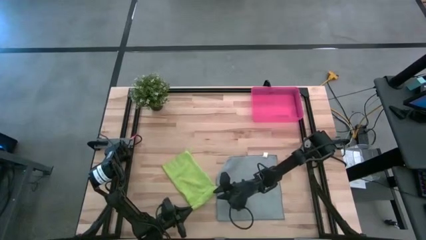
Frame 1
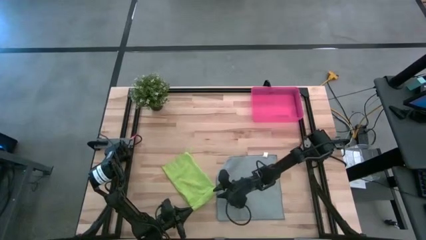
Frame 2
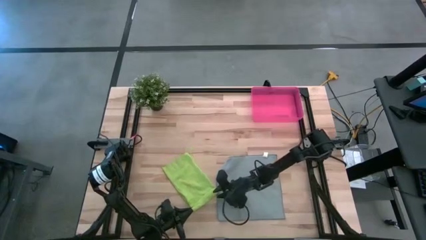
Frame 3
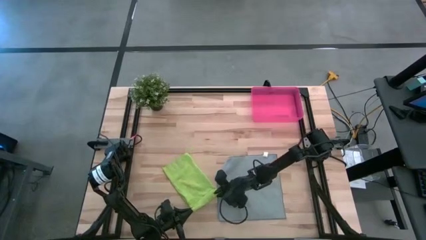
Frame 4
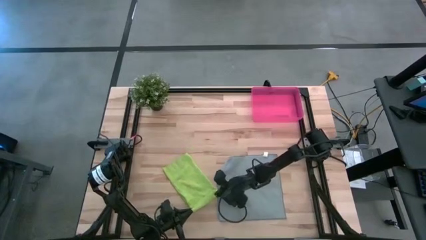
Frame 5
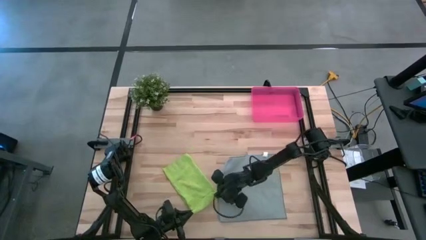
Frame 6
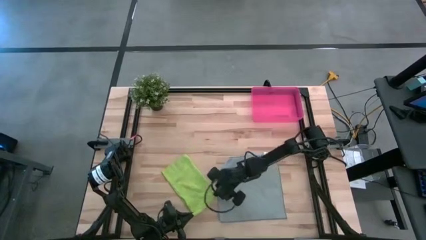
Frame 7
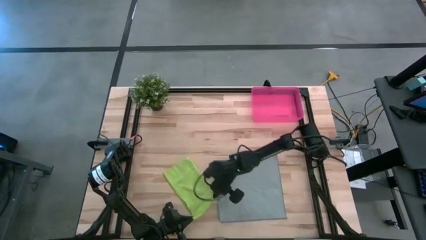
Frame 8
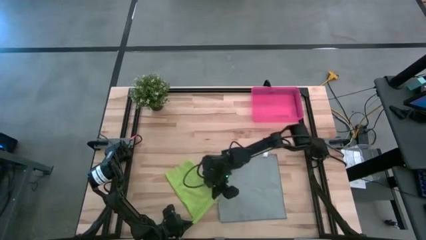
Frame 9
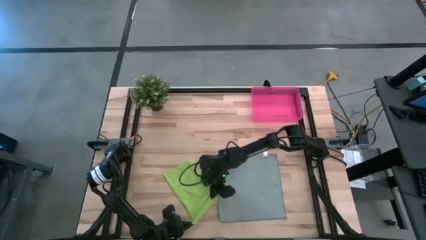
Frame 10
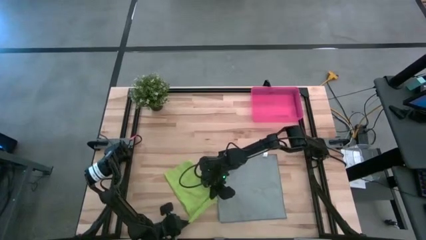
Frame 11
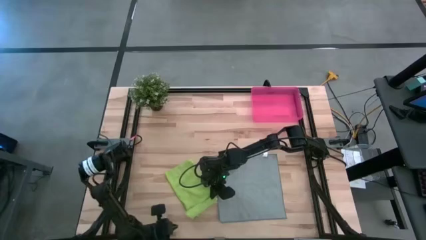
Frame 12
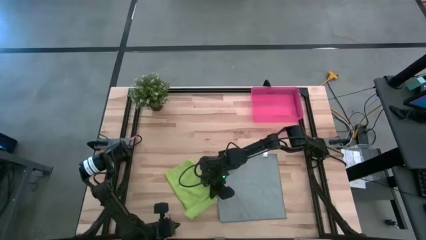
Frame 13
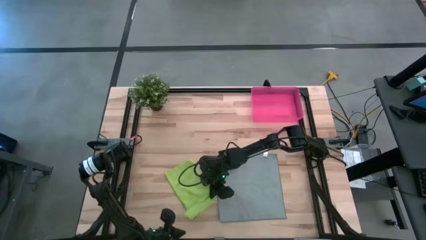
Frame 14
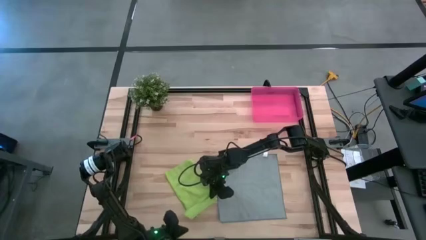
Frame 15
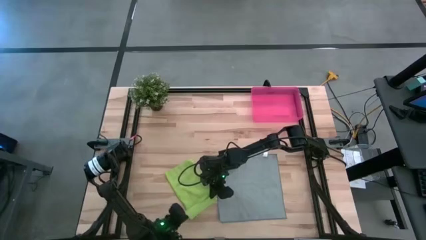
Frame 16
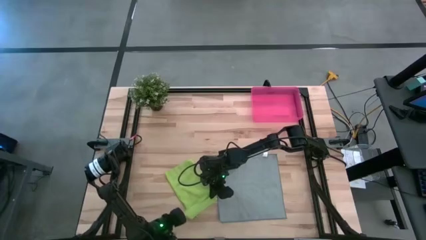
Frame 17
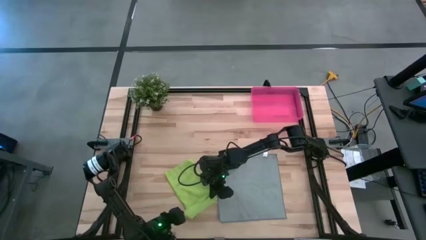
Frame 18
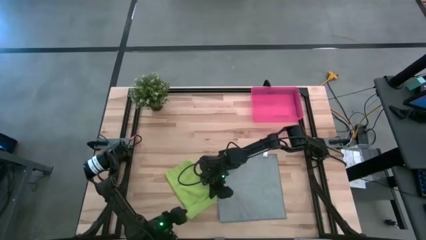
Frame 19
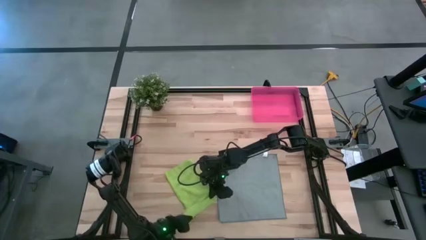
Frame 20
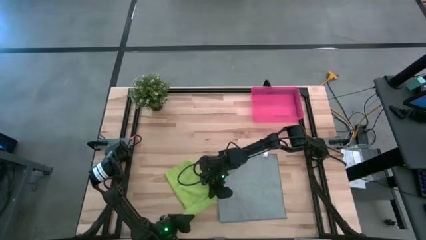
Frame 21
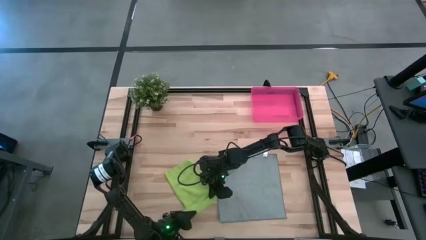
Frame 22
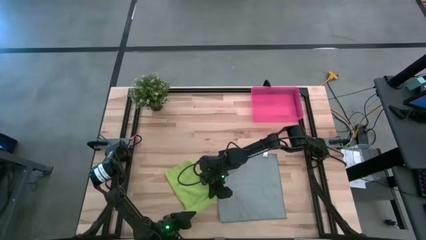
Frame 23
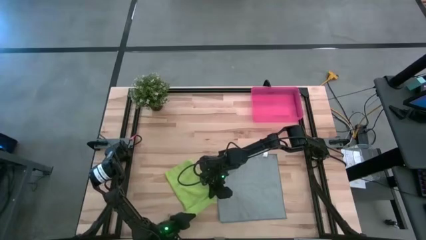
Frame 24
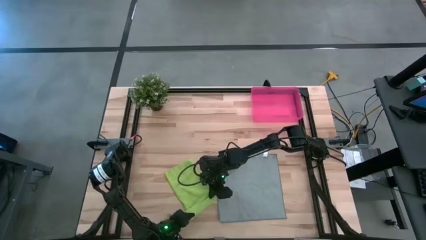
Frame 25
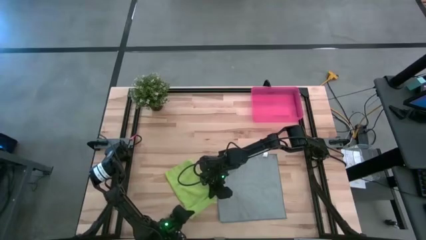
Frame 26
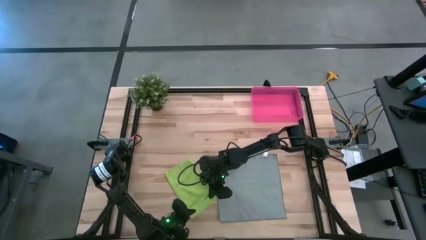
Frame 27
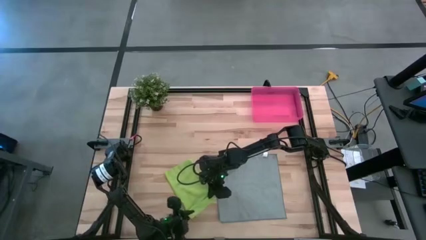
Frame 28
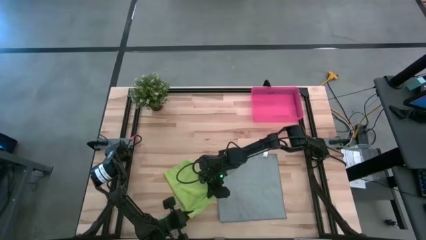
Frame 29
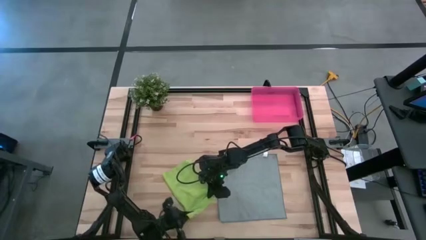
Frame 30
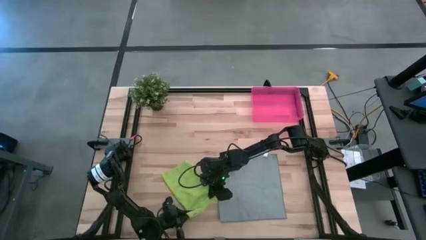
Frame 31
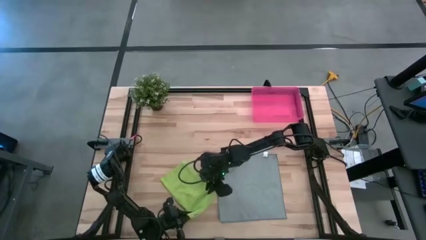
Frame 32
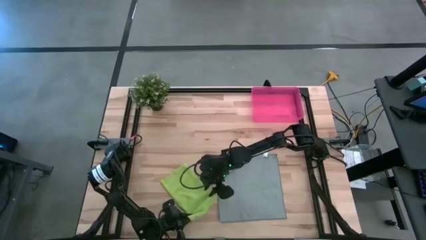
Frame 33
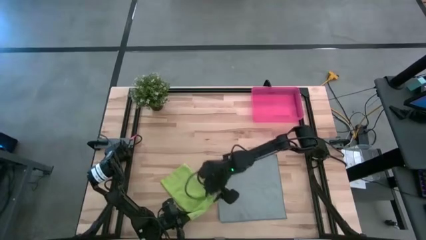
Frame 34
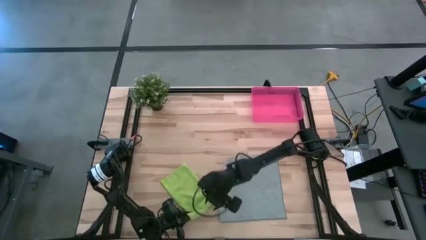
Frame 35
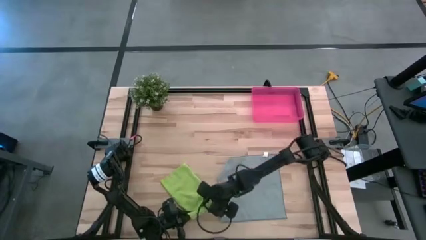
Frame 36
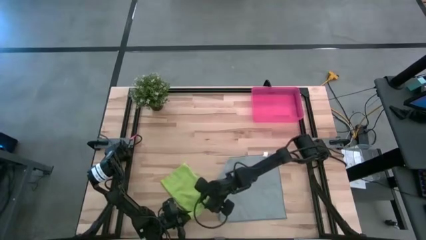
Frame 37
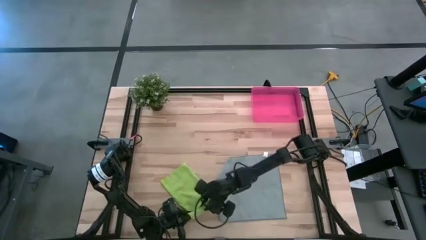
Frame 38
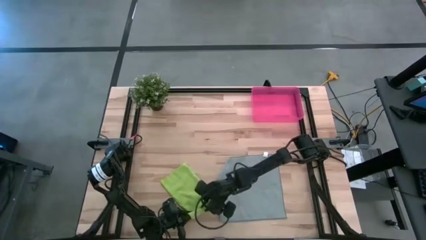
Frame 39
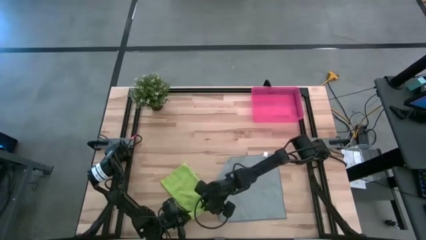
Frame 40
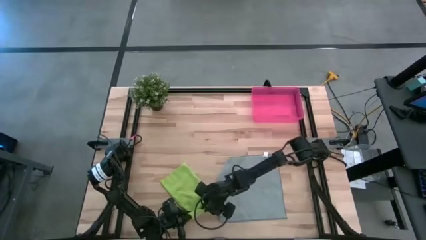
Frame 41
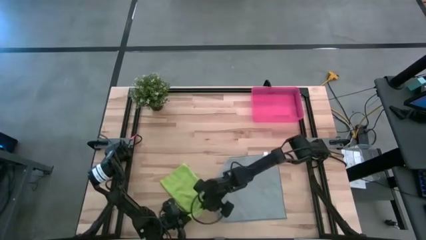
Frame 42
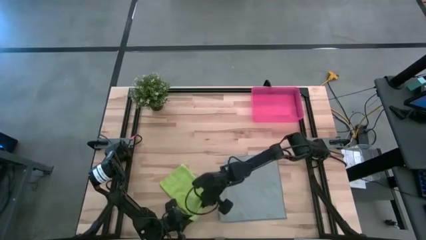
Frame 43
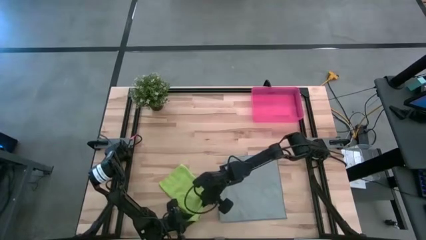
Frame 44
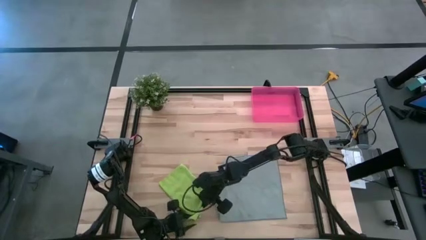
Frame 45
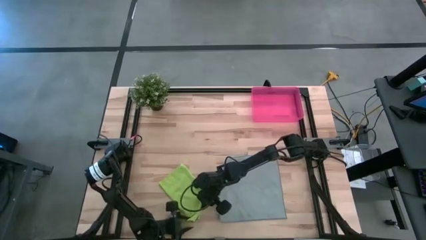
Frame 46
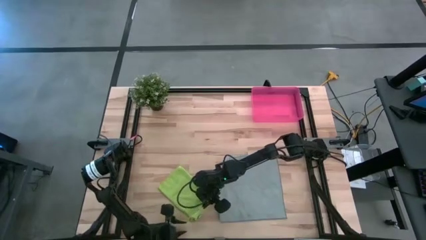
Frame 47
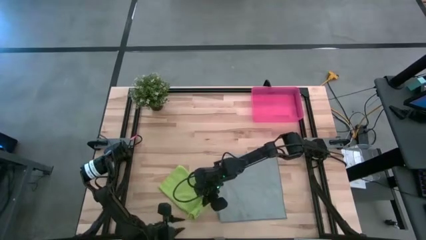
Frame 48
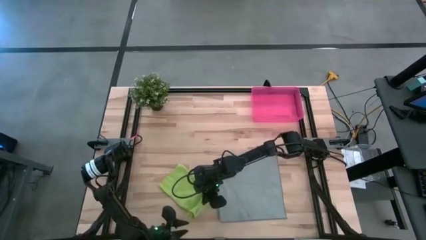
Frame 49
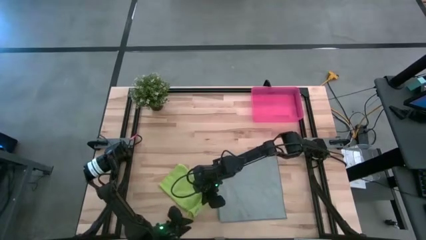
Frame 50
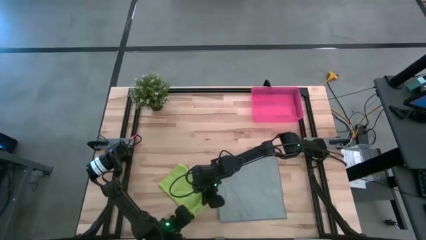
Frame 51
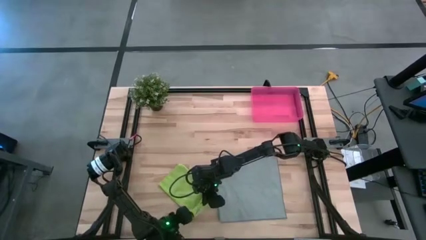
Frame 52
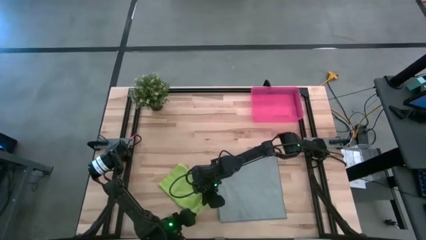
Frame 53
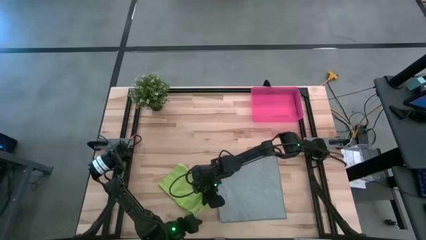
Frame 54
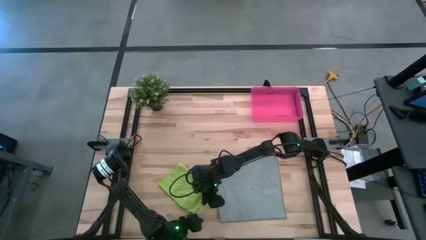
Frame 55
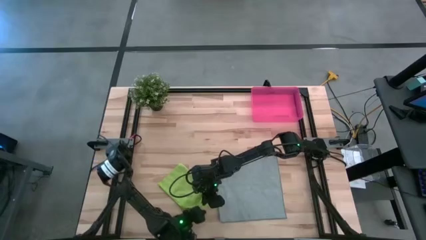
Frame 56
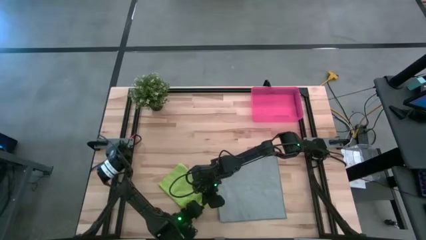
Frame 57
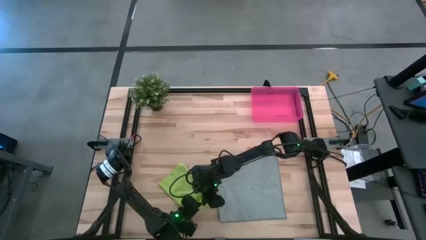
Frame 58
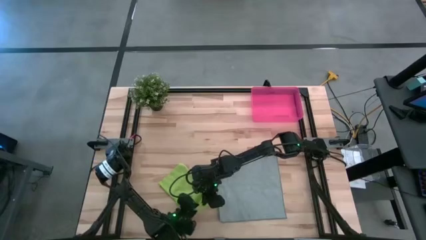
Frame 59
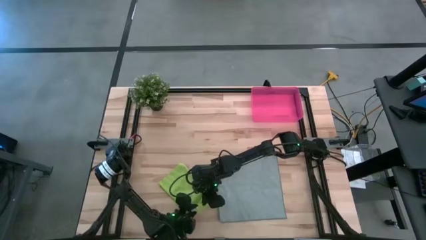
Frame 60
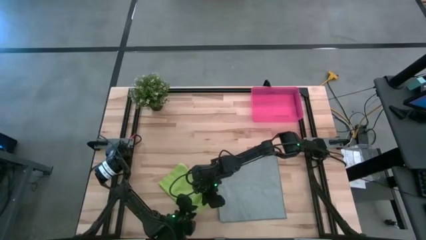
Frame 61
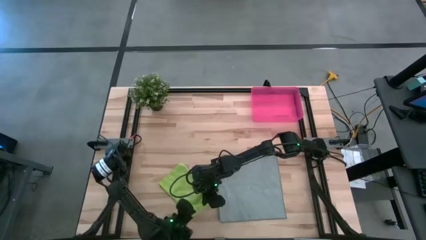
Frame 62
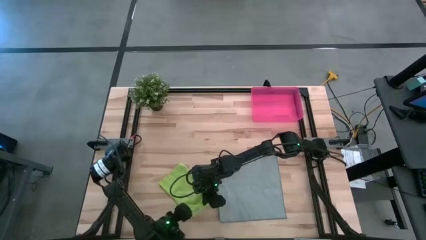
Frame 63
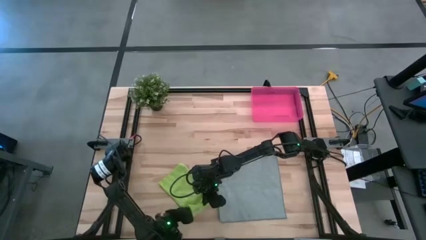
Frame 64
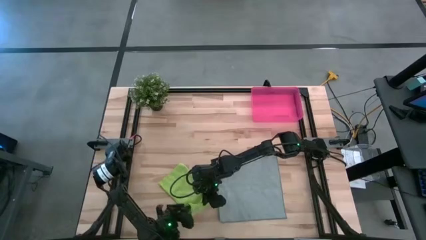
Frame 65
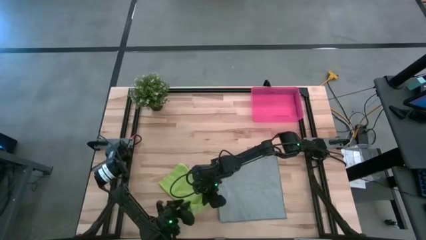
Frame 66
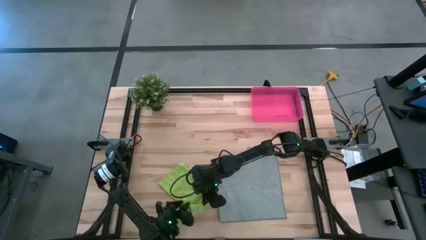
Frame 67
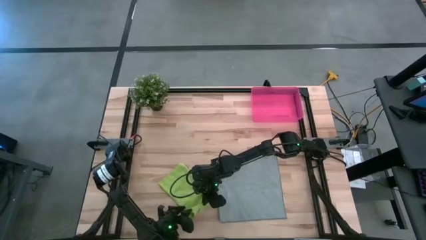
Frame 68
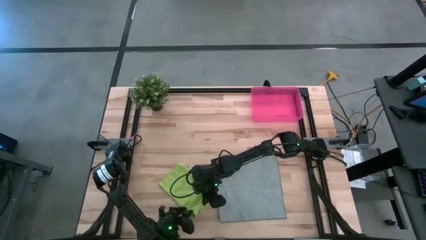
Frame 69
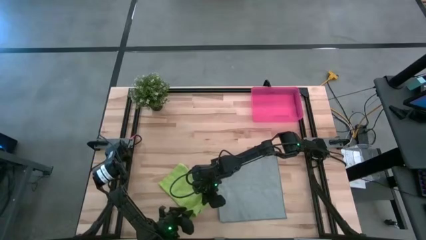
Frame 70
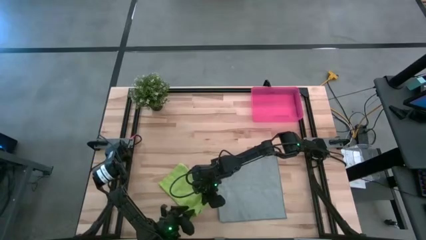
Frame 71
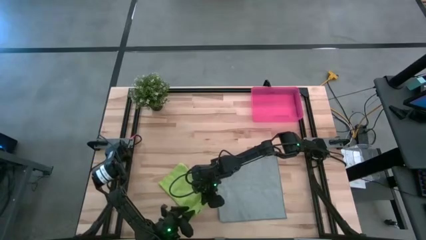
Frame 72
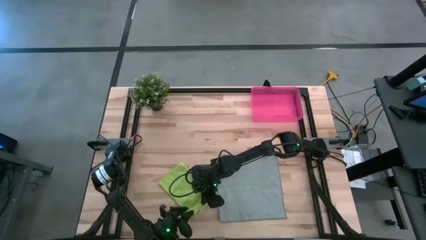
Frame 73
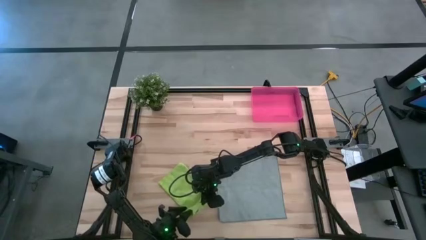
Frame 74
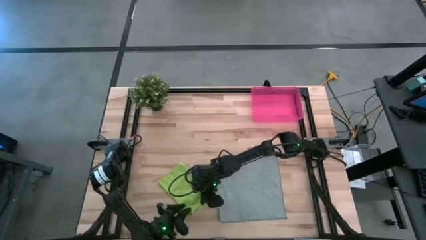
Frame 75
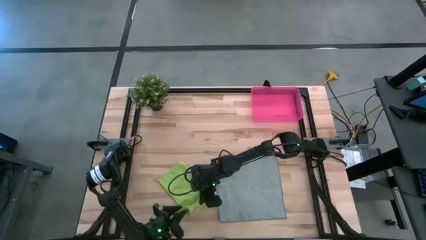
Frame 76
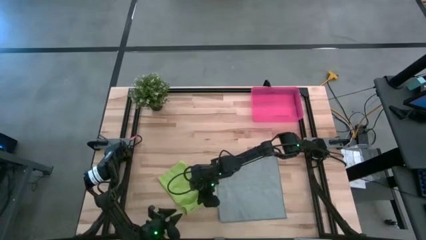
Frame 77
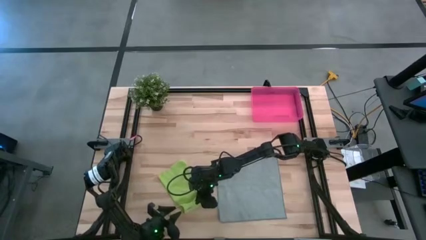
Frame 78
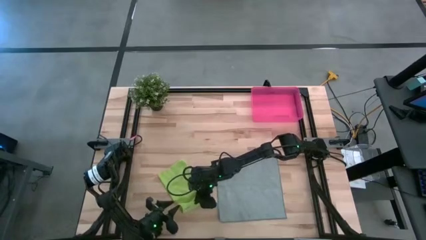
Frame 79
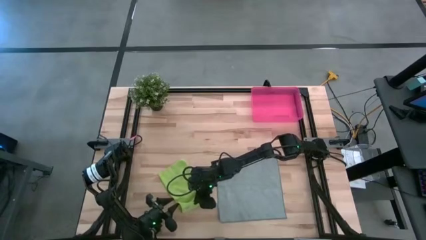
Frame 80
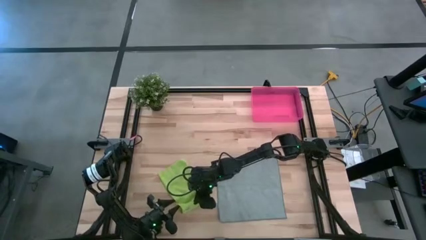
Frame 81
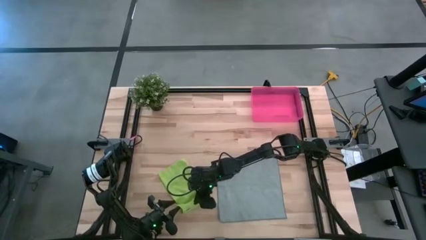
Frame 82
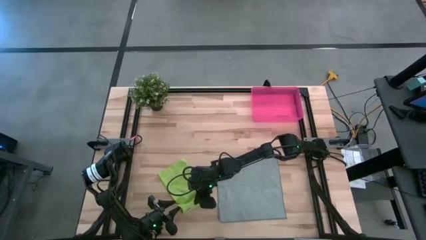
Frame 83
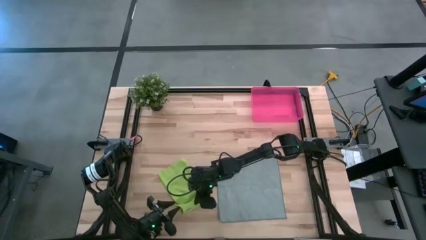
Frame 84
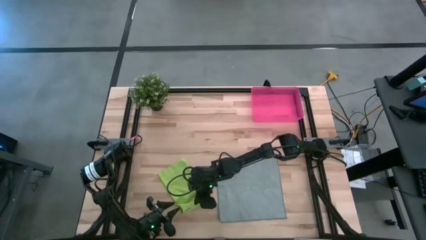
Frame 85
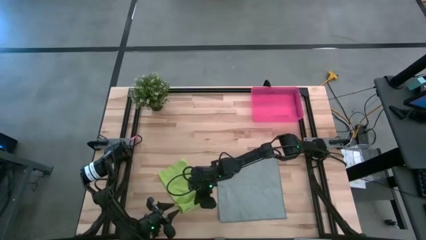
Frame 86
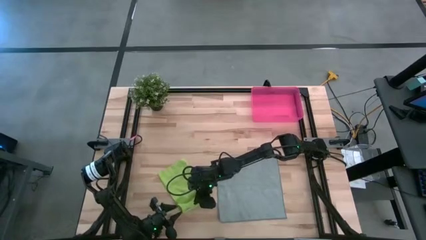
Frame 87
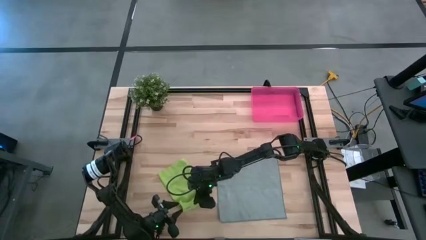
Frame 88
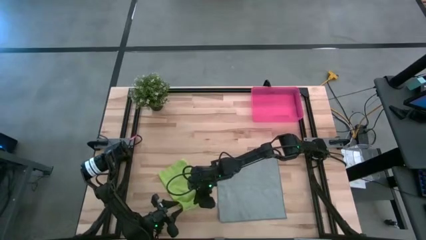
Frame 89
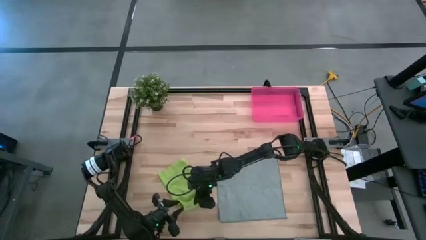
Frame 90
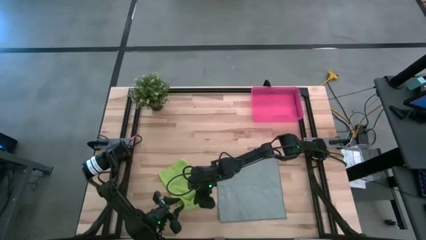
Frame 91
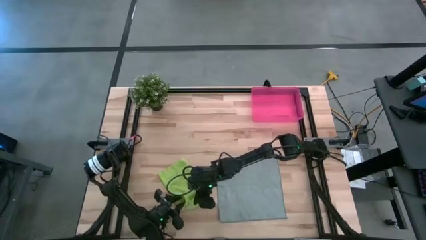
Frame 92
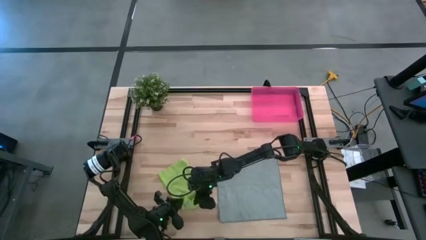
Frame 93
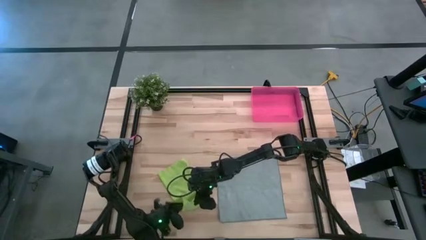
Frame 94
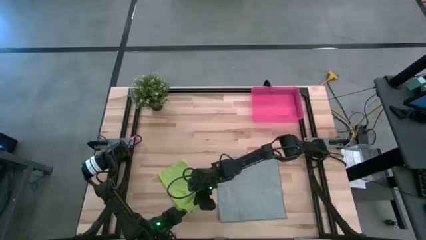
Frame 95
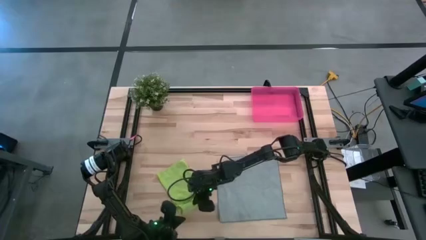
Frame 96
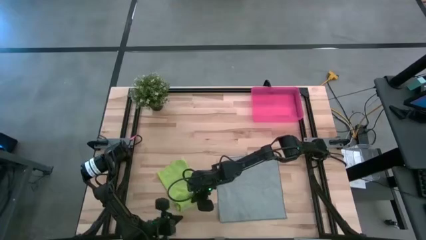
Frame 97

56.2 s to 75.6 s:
Task: Roll microfiber towels into tight, uniform cylinder then place into a basket
Roll the green microfiber cloth
